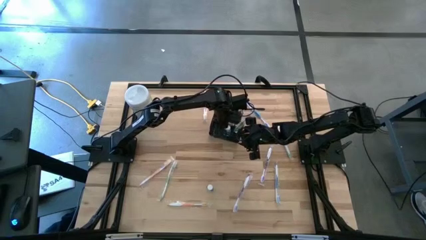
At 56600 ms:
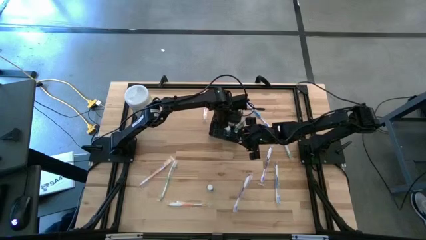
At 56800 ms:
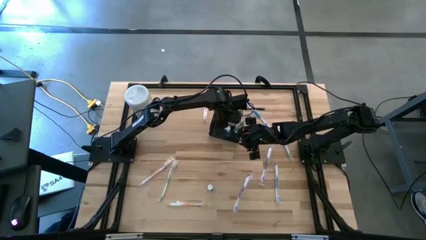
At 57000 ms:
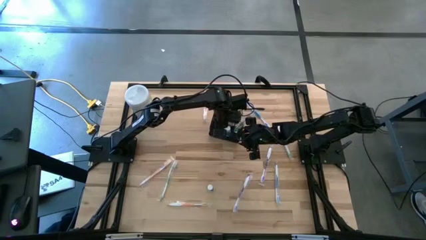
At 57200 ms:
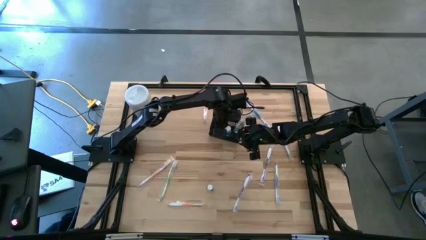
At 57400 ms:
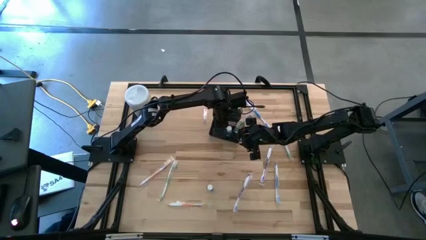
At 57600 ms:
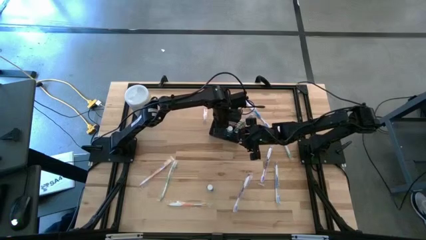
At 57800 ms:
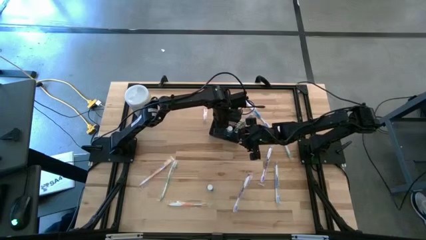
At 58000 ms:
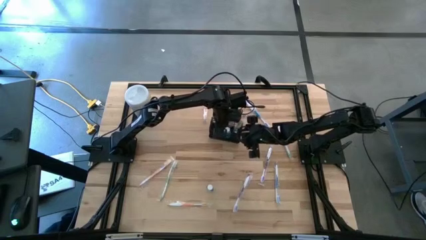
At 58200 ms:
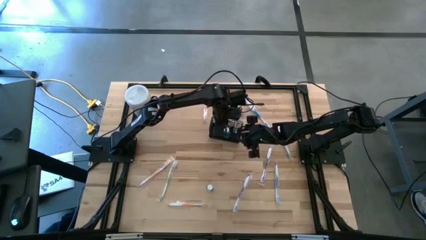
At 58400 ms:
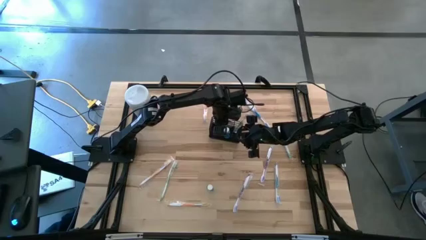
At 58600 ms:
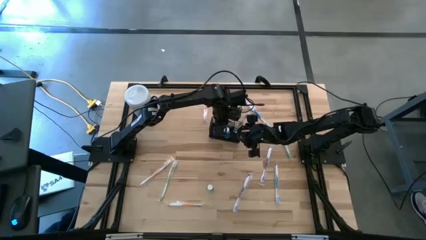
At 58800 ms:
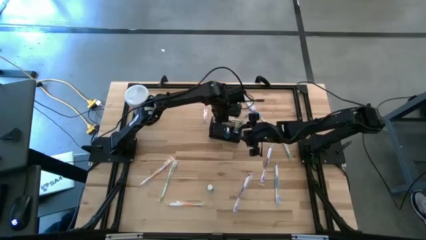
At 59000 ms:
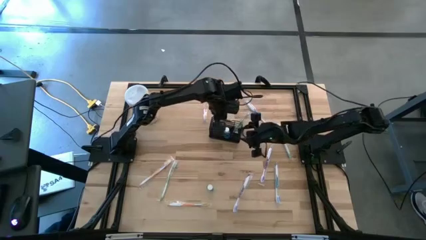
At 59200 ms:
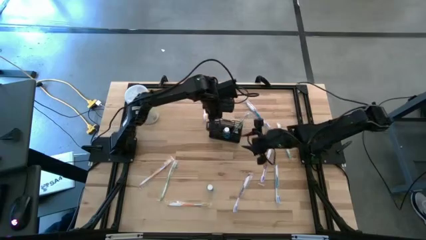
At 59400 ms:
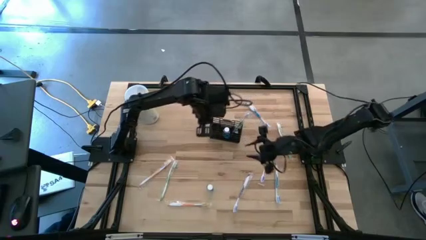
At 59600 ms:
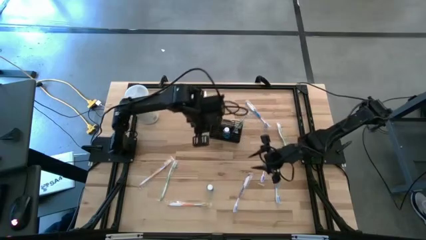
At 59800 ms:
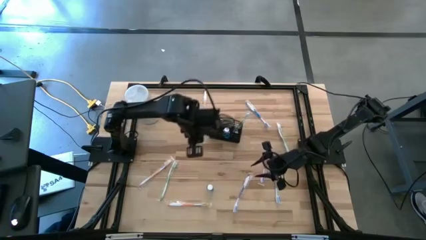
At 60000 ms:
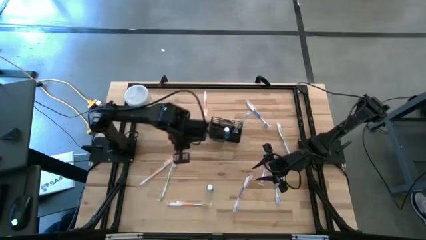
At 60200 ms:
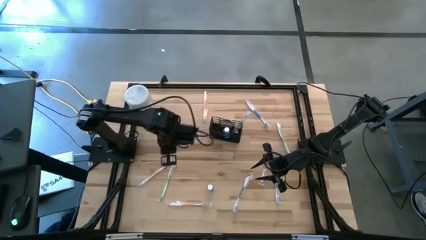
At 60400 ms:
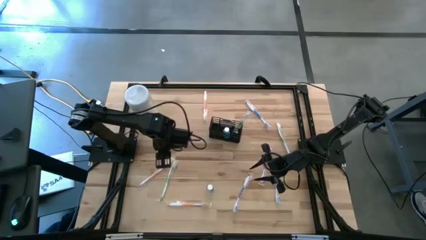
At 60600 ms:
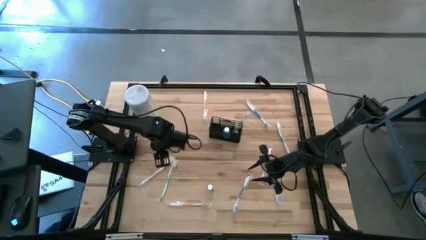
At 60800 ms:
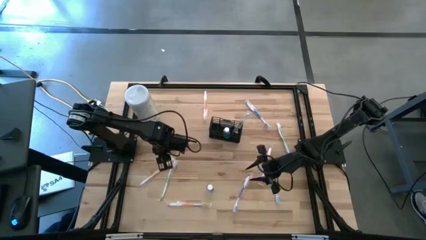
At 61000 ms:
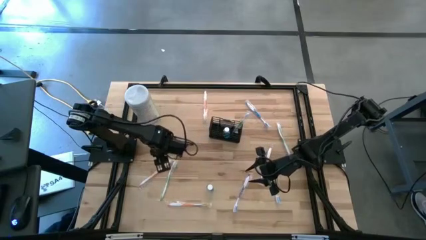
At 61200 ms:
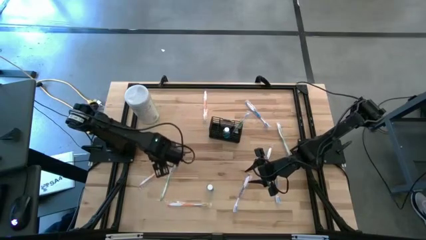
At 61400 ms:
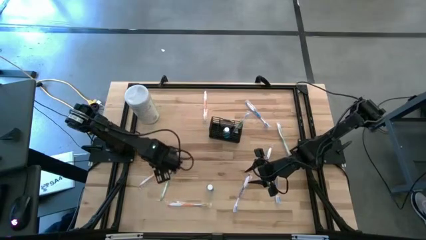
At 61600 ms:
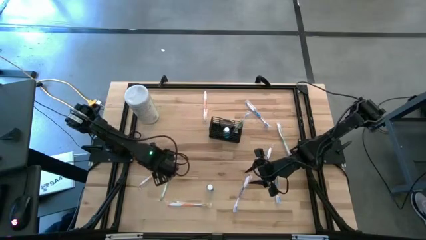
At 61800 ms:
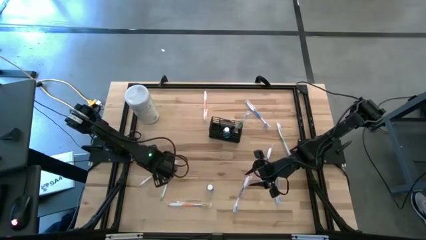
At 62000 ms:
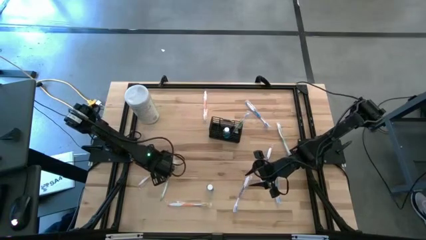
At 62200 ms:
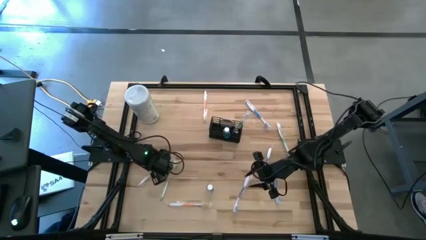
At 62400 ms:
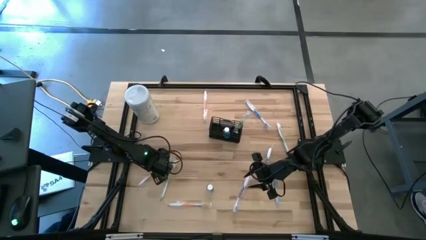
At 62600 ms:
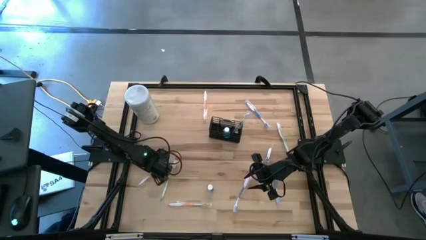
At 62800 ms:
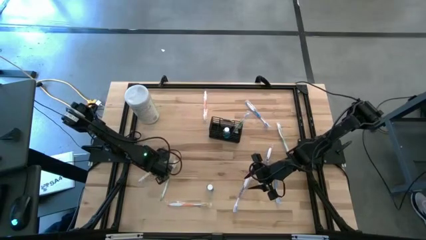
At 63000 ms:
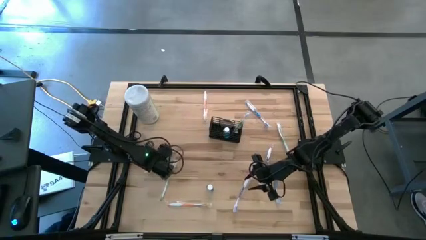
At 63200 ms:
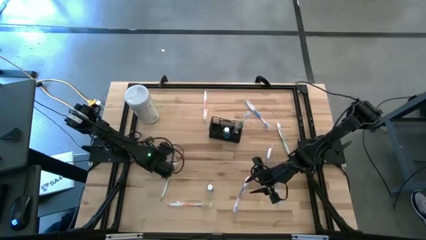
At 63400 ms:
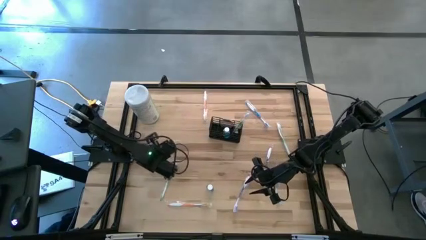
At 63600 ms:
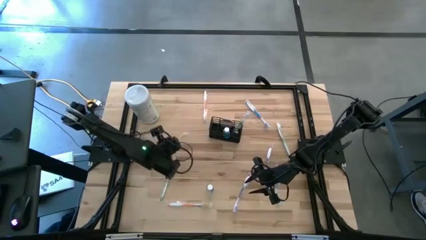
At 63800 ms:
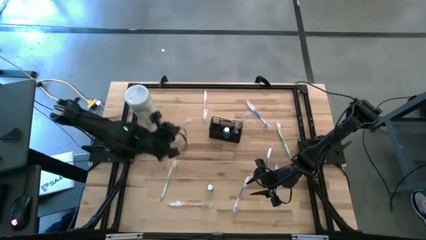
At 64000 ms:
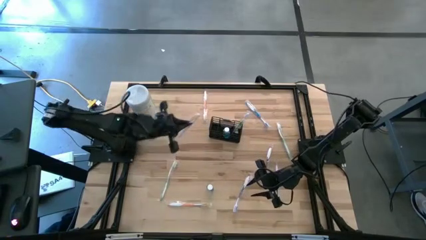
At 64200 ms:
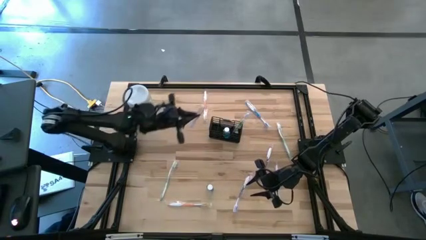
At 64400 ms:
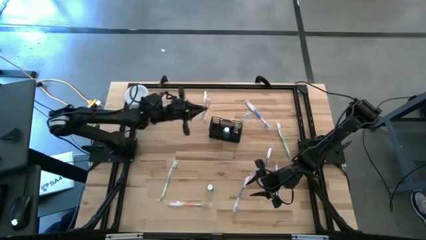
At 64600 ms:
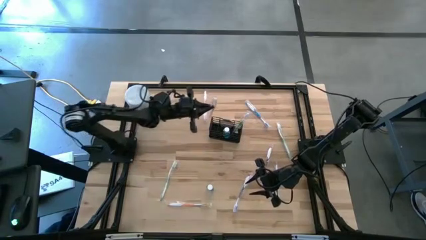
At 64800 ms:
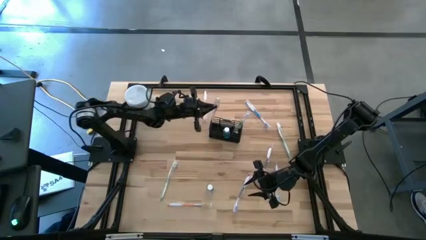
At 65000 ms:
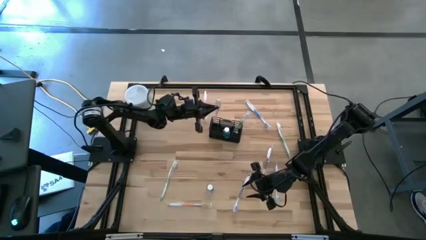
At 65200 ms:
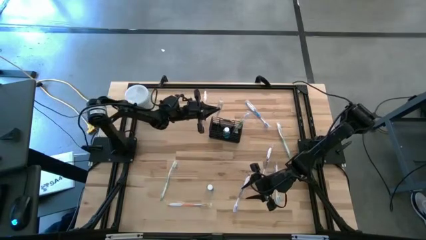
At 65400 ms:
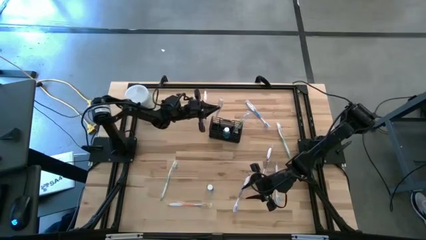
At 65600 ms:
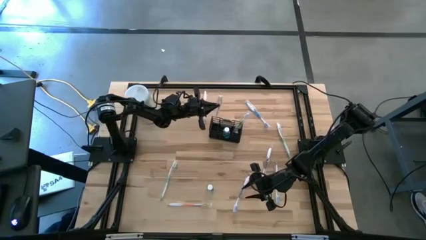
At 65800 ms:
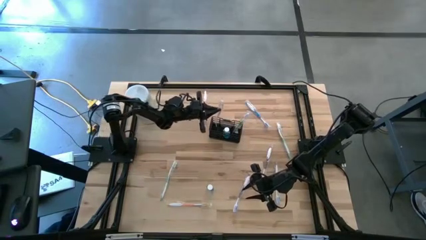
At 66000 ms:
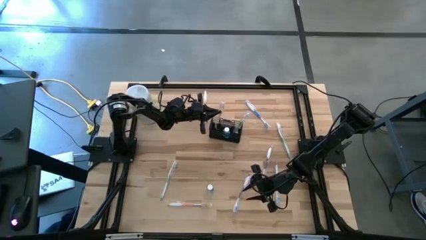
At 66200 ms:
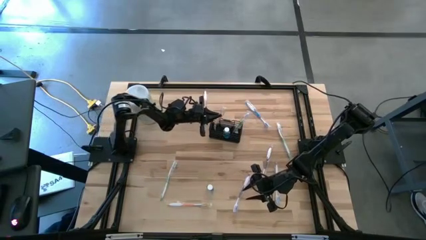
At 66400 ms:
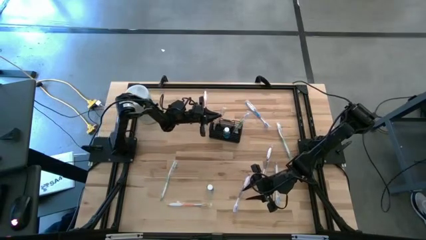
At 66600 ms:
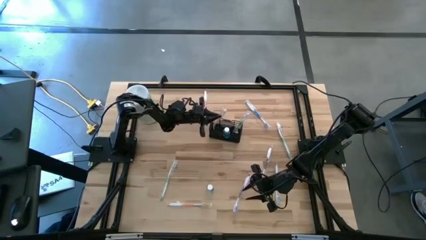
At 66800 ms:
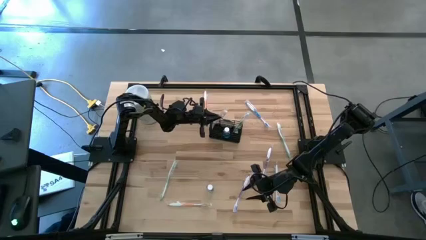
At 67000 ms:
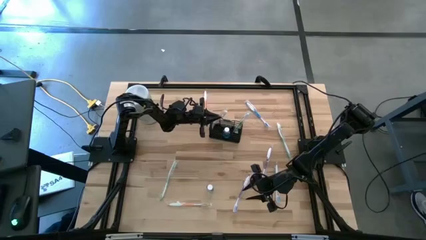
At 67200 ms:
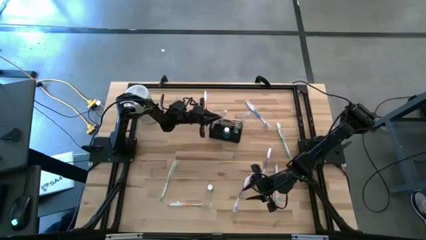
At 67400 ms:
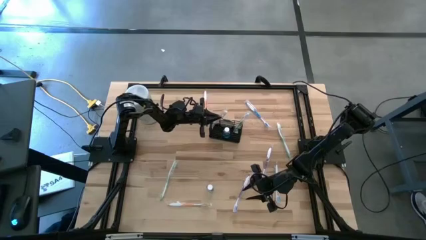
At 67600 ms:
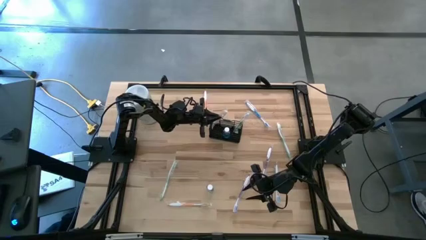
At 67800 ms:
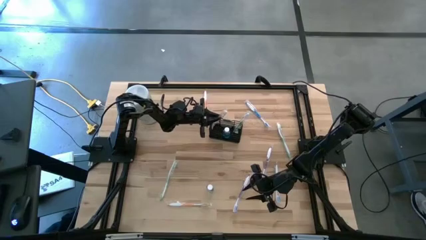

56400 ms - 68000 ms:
Task: Pick & Place toothbrushing station
Put the middle orange toothbrush into the mesh organizer
